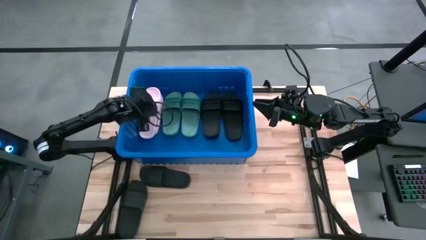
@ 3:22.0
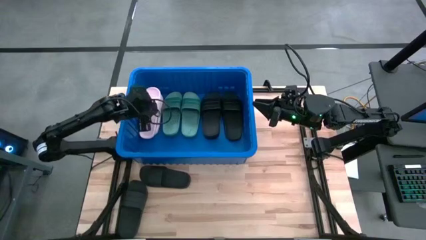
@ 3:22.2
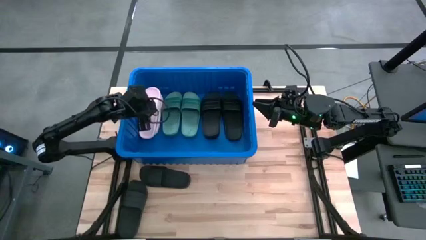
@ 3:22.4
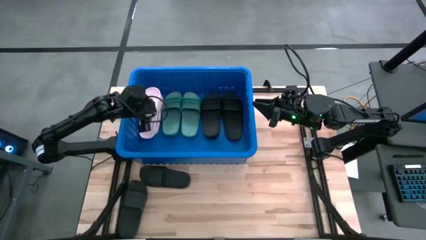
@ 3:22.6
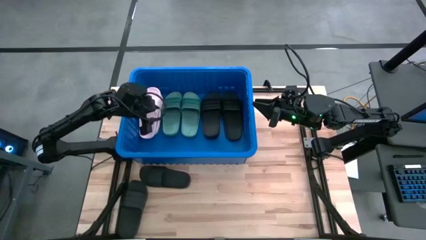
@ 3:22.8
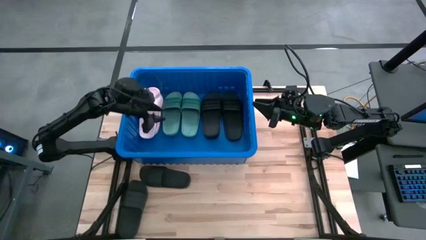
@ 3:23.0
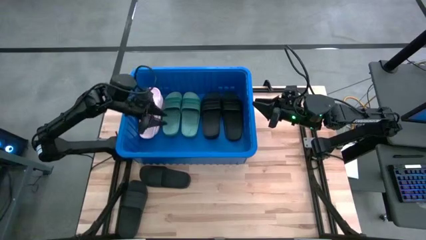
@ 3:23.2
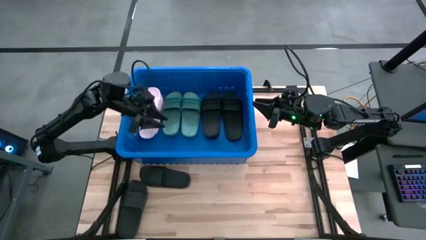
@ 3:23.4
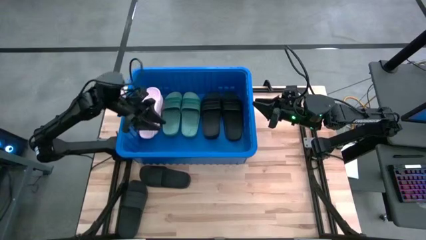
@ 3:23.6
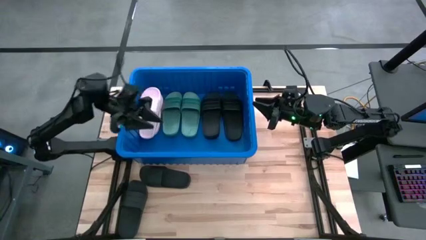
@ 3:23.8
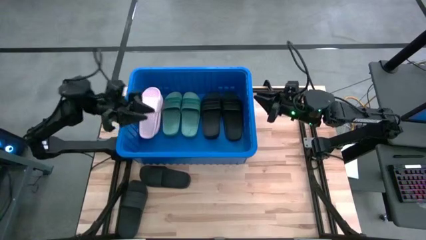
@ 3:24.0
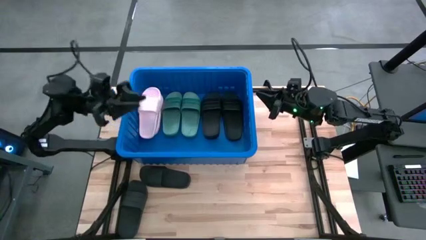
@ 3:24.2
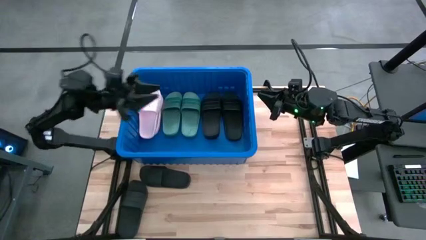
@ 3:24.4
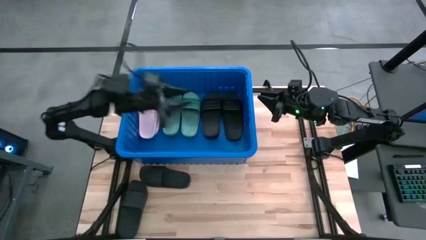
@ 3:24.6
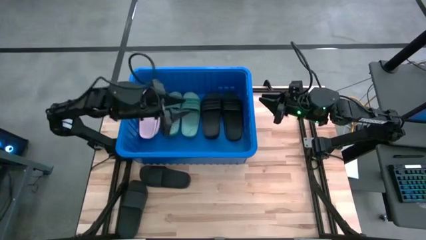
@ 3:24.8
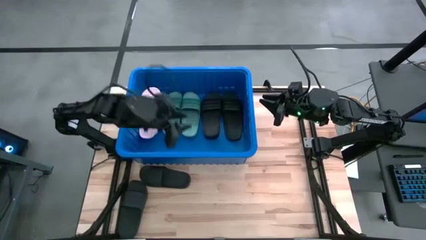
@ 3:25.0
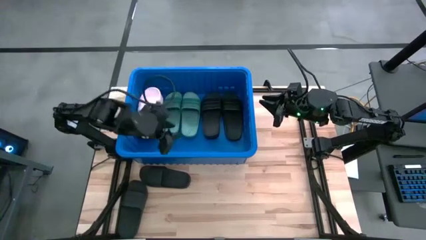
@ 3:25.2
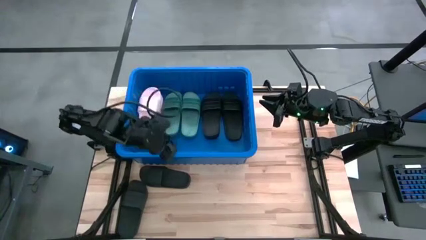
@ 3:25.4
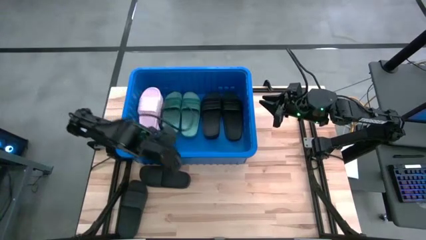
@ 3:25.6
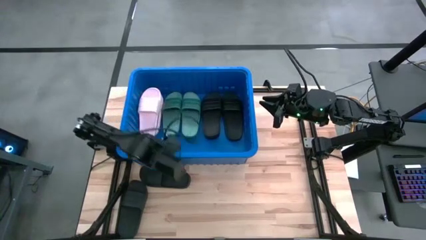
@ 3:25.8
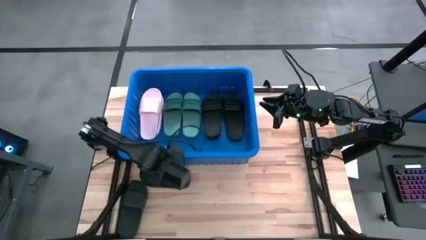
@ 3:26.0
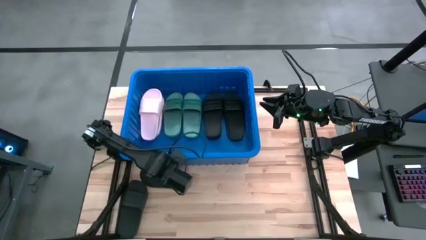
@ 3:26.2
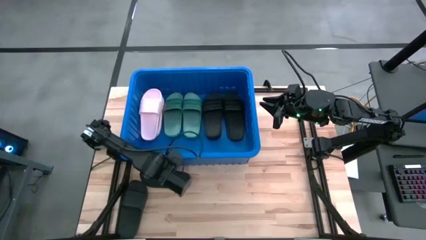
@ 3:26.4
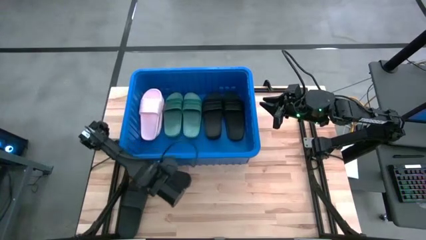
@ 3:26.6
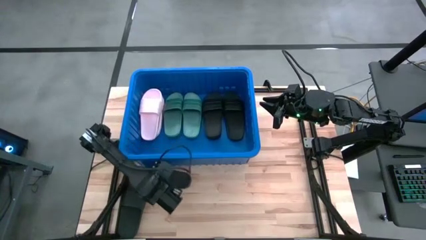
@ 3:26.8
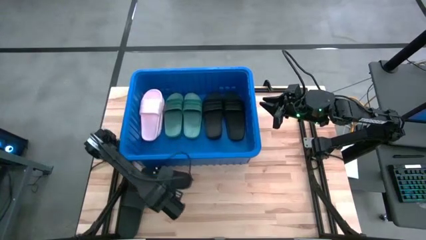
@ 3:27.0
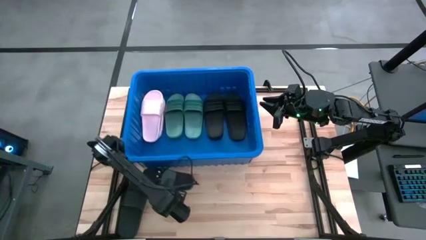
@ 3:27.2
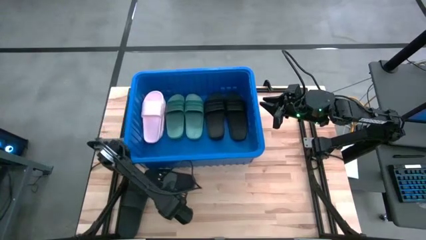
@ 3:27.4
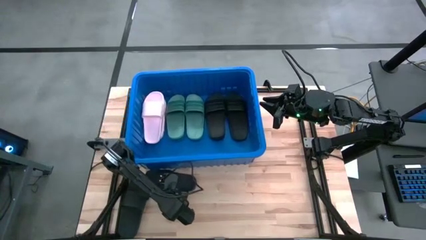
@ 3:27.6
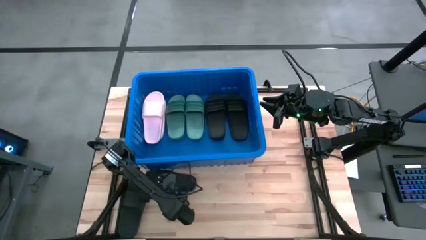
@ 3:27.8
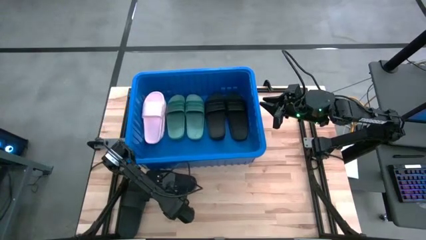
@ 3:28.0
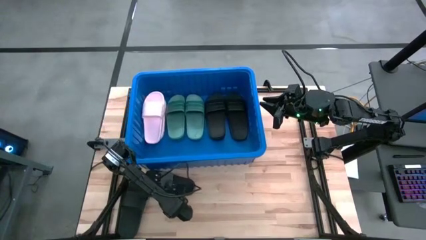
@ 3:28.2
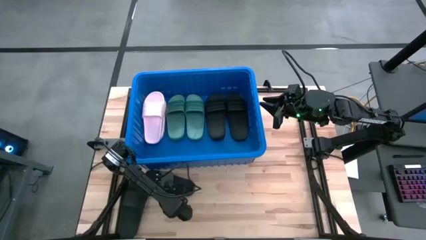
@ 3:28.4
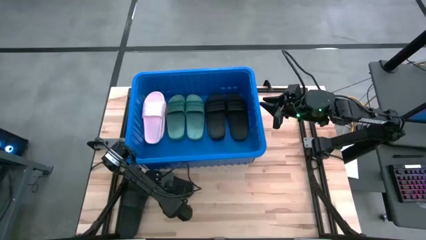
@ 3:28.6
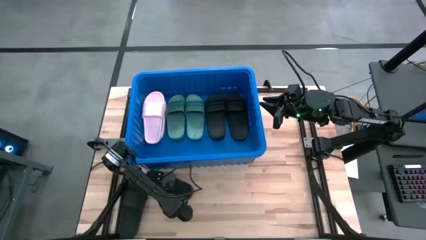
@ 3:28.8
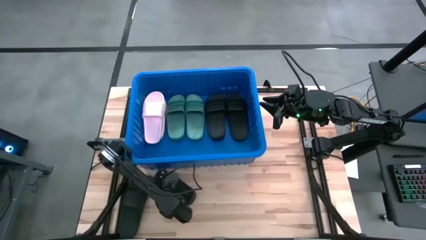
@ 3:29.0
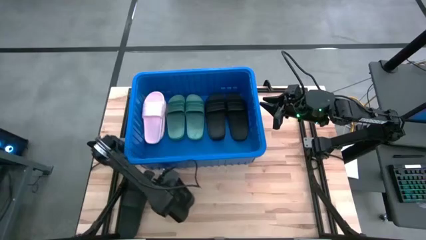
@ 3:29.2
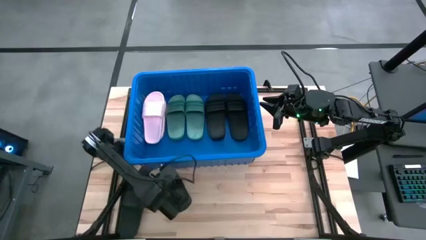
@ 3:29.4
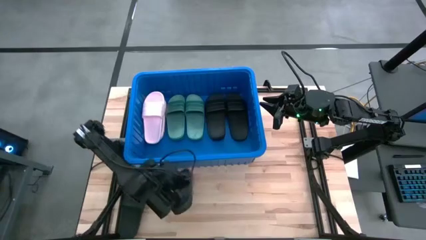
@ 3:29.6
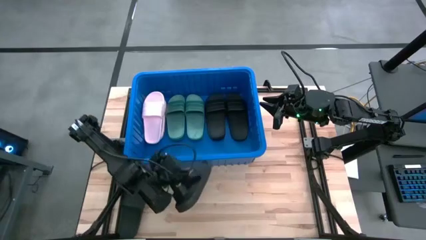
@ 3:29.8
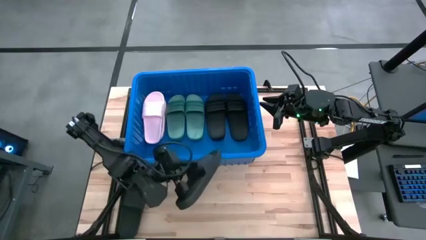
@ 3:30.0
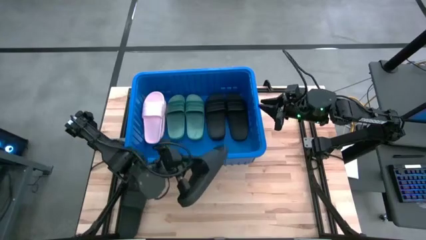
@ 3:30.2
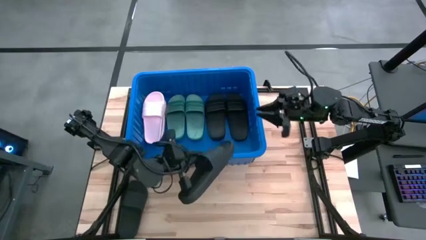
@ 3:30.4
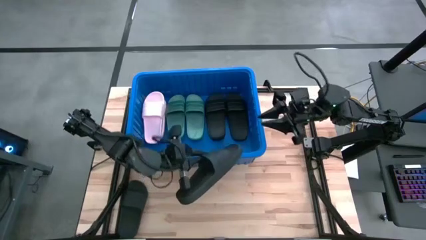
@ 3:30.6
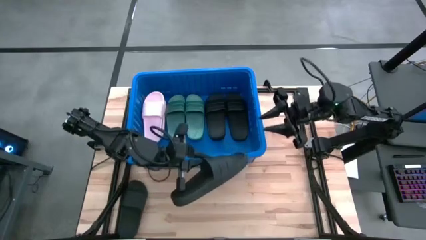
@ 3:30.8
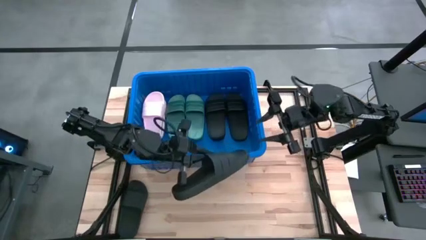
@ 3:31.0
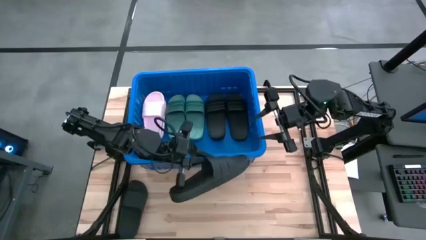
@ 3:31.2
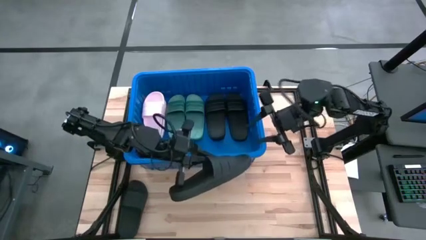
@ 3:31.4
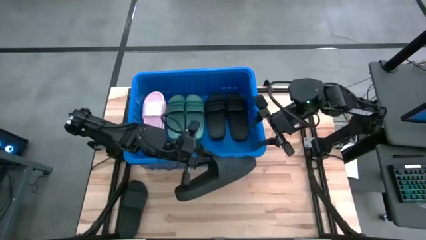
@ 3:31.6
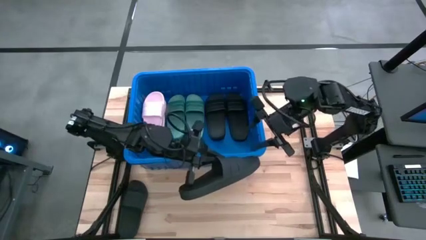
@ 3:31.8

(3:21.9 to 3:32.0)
Task: Pick and place slides into bin
Put the black slide into the blue bin

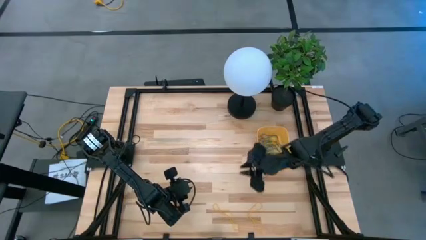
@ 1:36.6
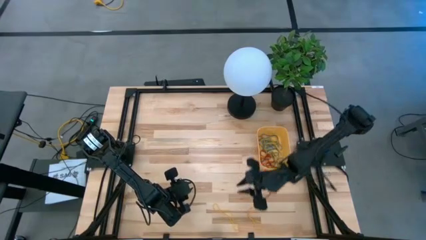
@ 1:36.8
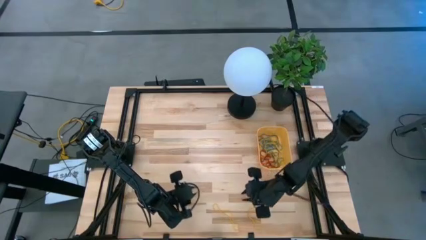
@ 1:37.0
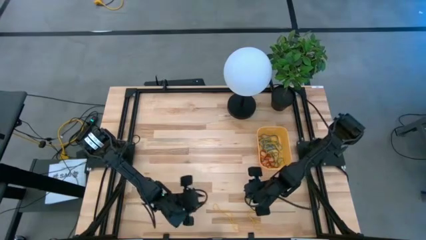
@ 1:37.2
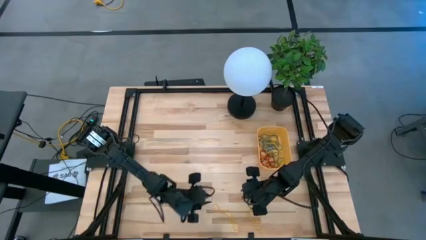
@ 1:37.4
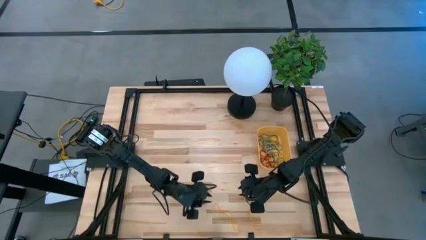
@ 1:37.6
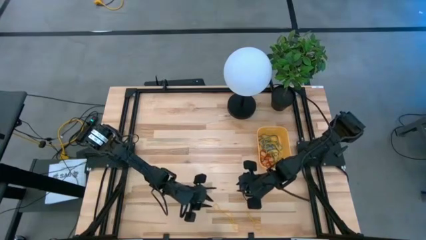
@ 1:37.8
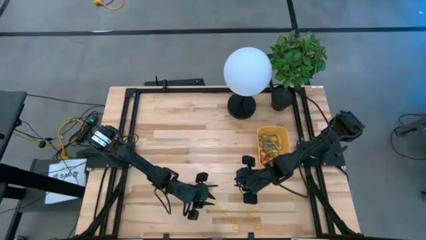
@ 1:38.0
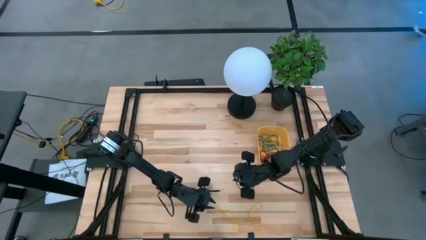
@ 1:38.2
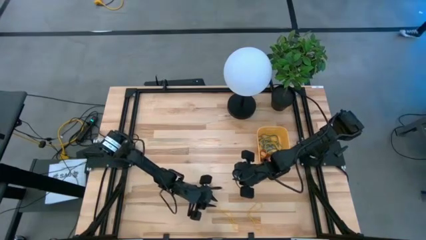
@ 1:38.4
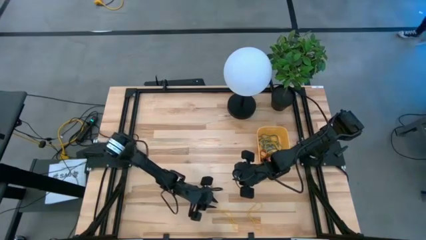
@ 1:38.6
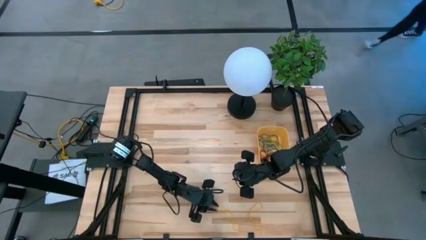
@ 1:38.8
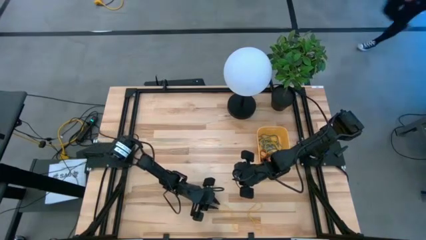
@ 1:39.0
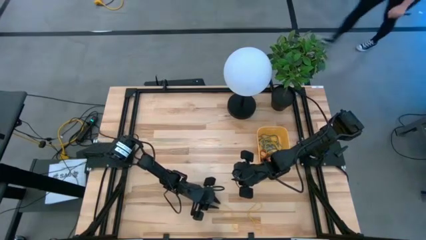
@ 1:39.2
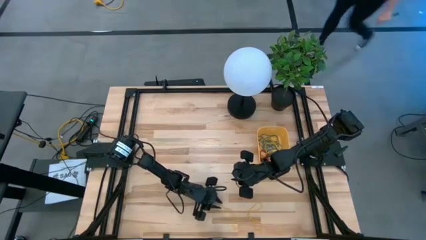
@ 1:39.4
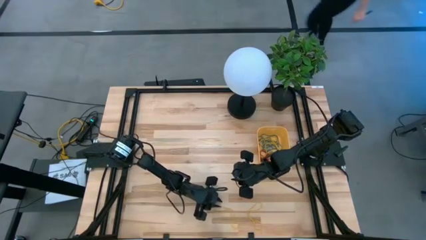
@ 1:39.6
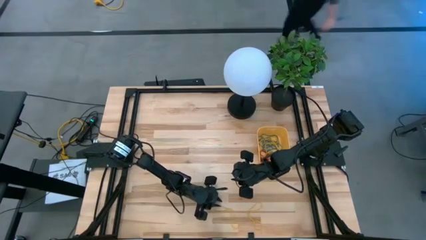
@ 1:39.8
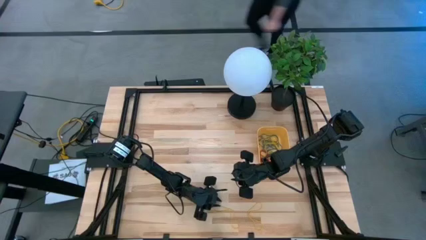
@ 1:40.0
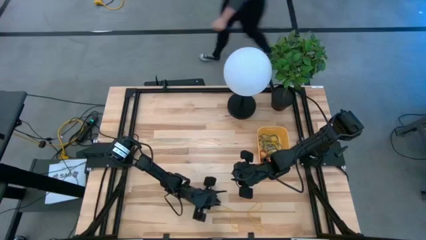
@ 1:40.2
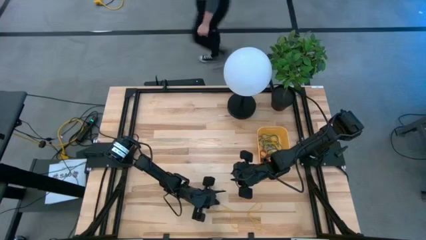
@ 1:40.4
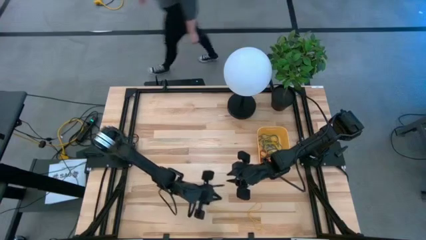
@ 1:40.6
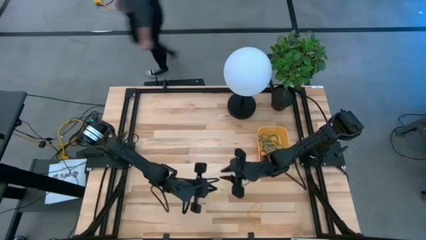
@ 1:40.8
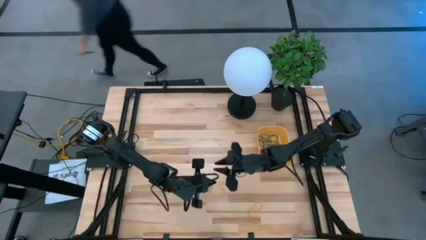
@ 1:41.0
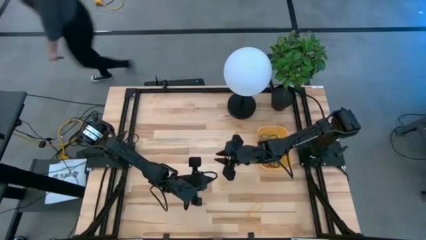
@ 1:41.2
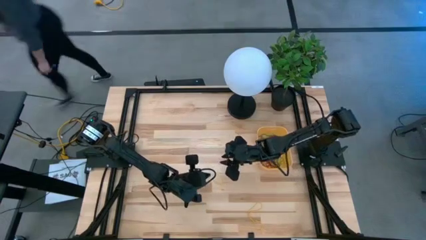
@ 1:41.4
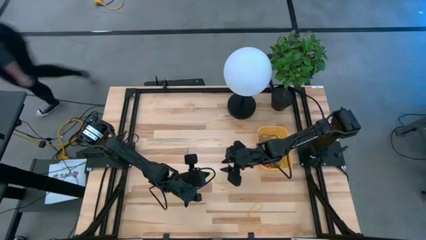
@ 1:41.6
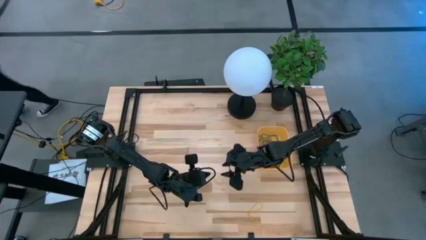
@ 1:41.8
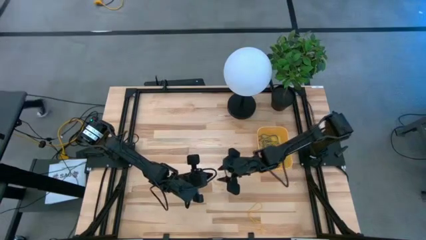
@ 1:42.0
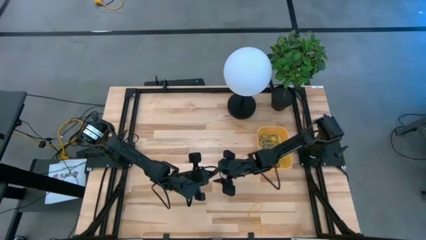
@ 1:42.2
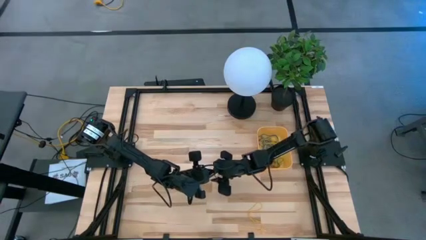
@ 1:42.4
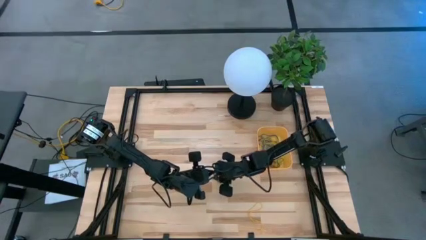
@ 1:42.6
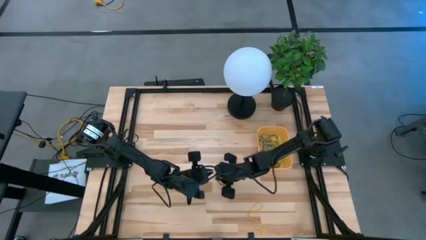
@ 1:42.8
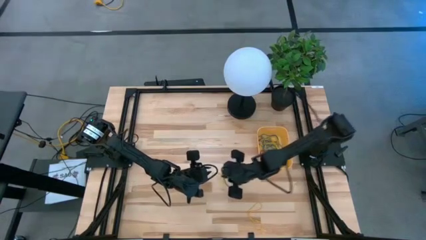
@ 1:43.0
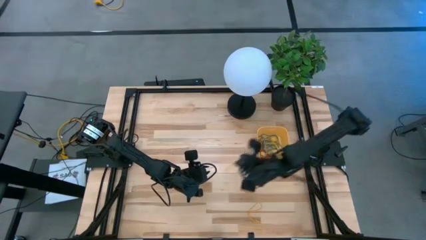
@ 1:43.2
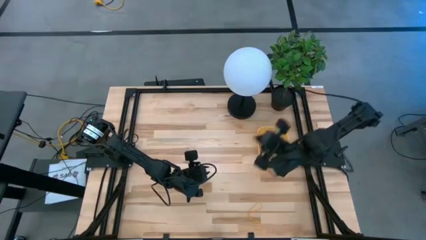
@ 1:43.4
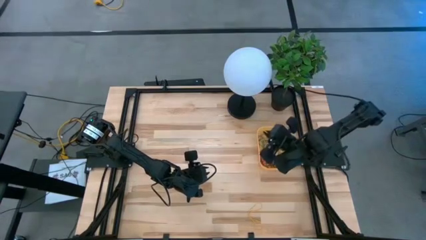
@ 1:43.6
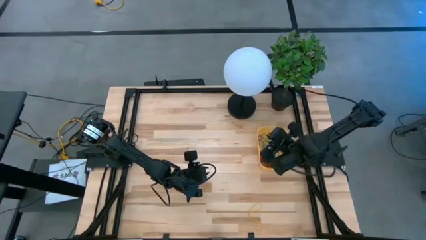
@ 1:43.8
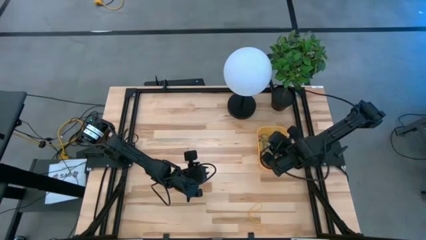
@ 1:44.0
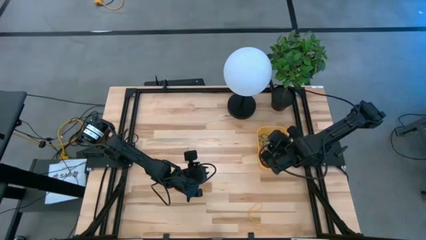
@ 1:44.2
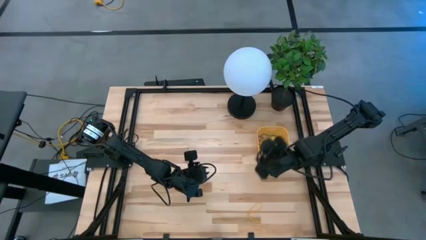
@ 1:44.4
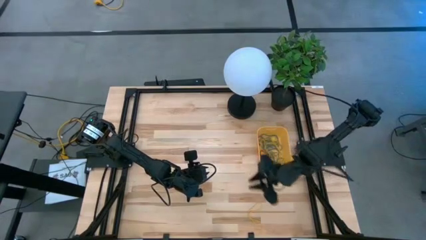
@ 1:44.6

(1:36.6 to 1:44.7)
Task: Pick and place items into bin
Put the yellow rubber band into the bin
